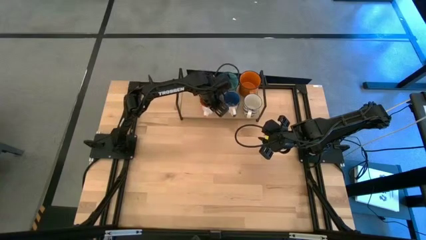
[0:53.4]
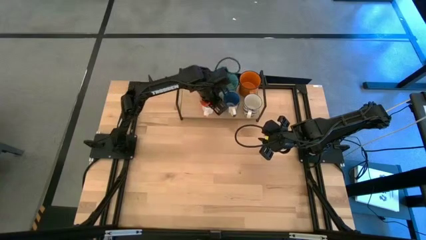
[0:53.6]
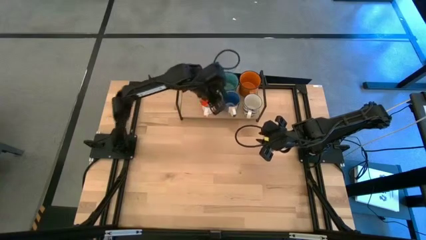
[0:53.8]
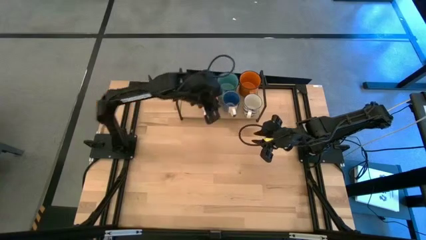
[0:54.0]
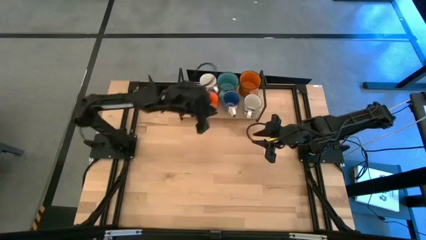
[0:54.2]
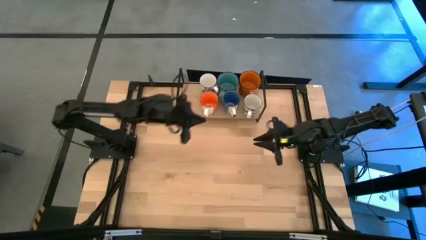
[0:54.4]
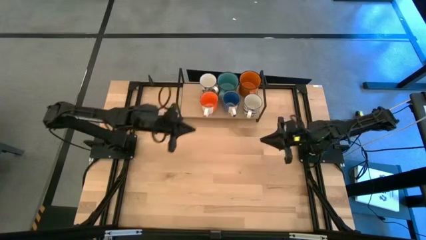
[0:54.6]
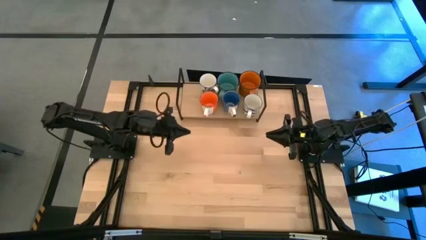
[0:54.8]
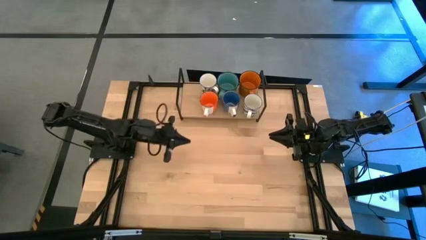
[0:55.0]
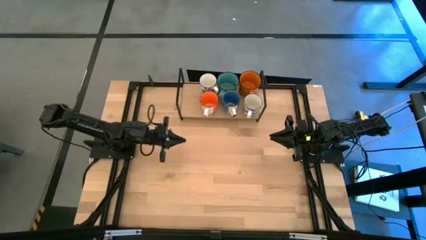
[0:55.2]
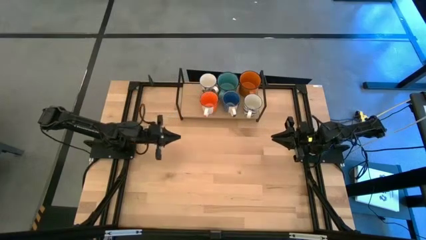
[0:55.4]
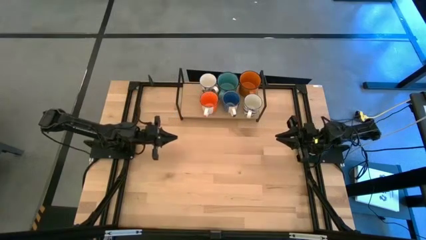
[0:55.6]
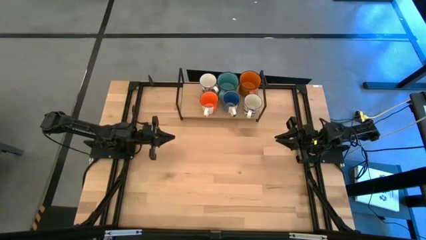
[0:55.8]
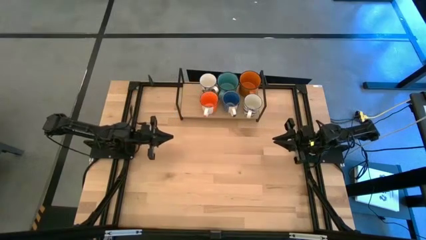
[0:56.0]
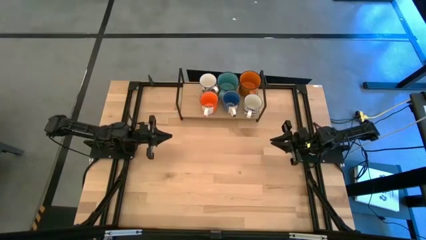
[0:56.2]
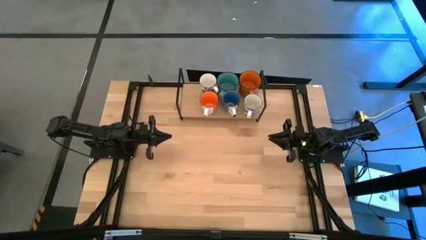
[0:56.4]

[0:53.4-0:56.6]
Task: Place coffee mugs
Return to Home Position

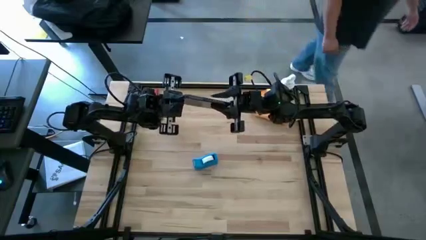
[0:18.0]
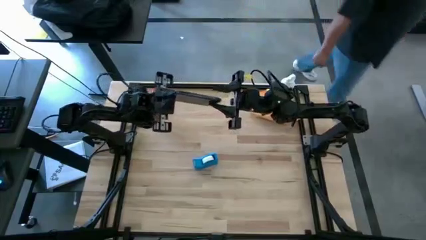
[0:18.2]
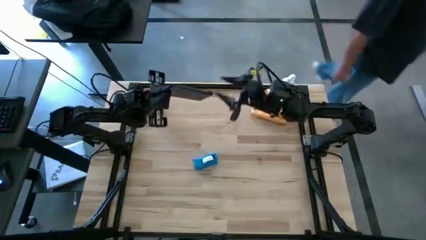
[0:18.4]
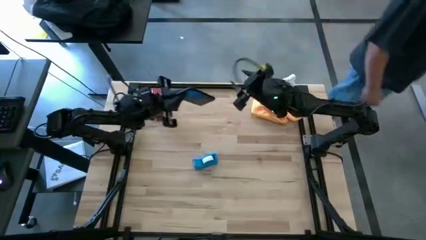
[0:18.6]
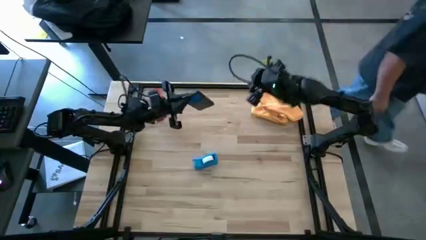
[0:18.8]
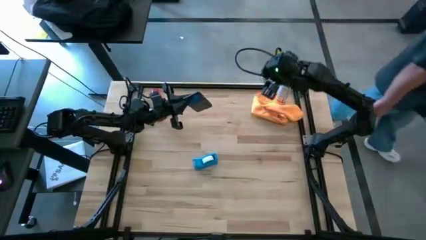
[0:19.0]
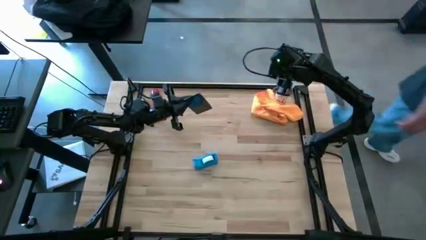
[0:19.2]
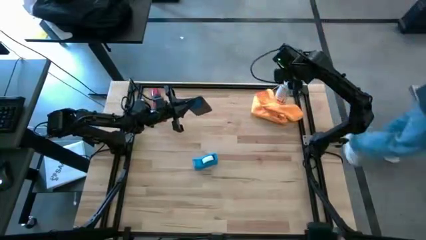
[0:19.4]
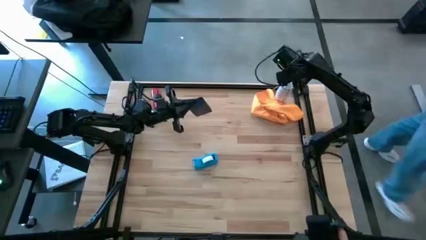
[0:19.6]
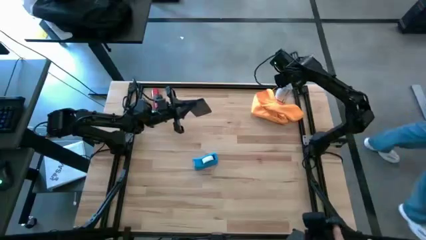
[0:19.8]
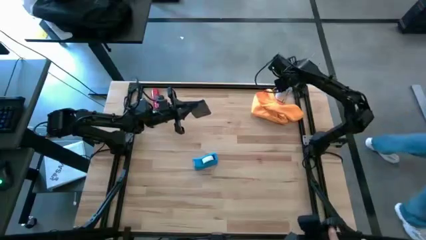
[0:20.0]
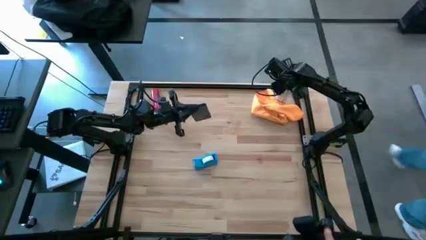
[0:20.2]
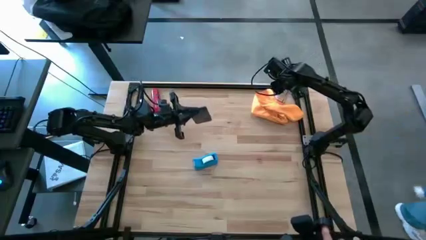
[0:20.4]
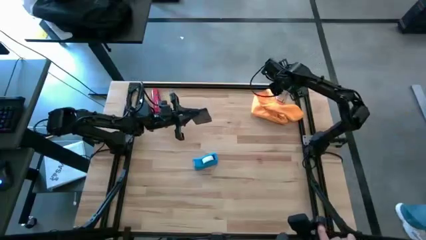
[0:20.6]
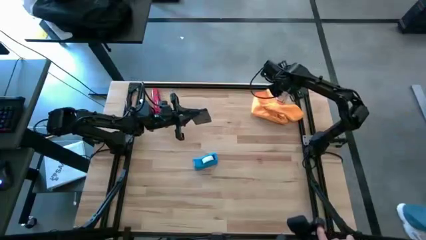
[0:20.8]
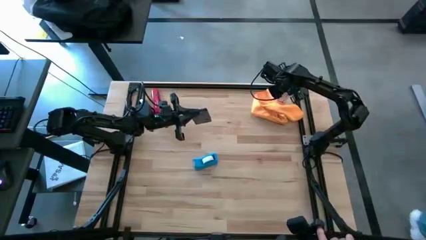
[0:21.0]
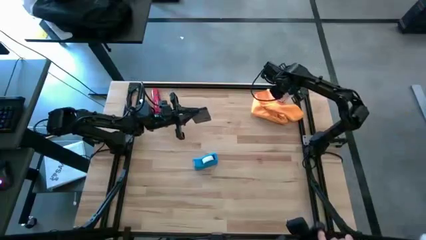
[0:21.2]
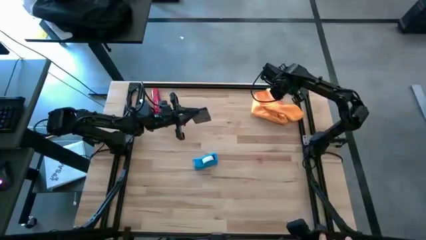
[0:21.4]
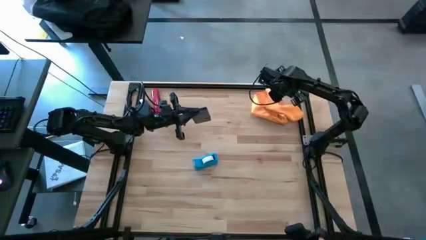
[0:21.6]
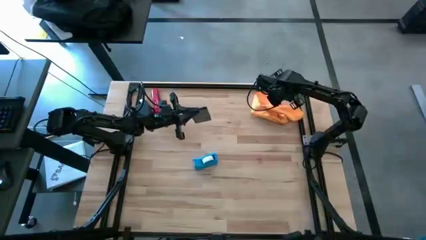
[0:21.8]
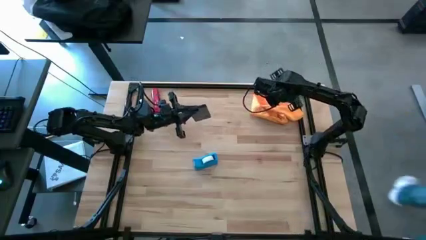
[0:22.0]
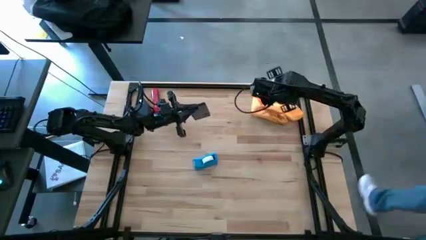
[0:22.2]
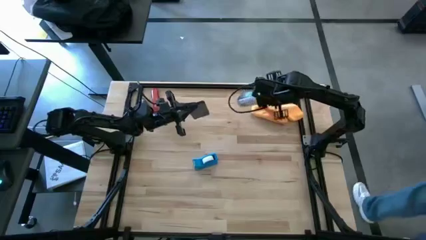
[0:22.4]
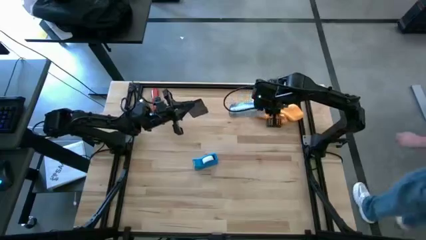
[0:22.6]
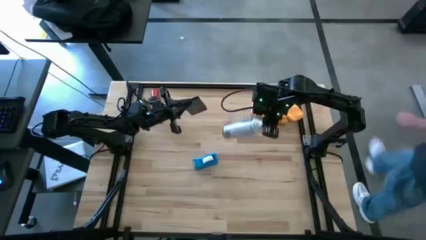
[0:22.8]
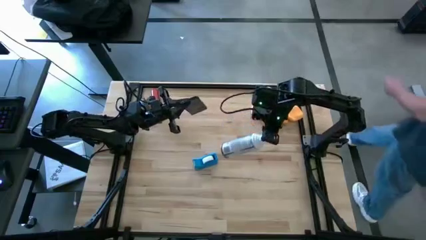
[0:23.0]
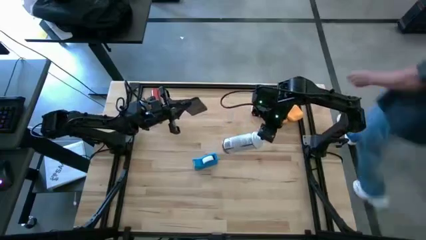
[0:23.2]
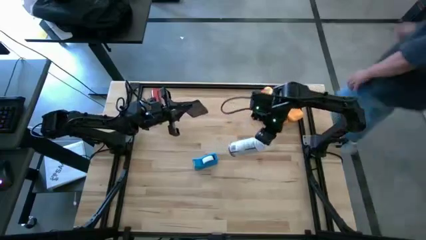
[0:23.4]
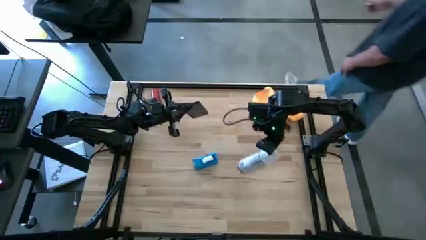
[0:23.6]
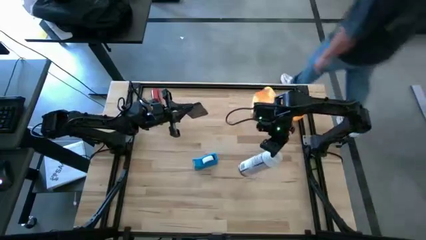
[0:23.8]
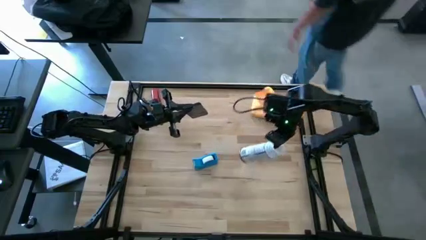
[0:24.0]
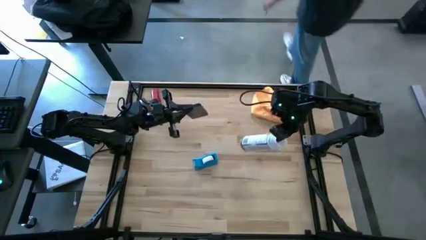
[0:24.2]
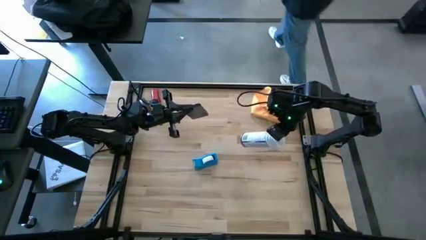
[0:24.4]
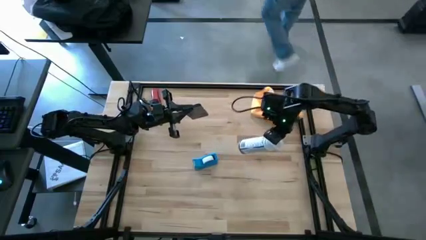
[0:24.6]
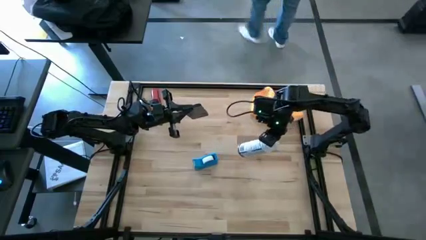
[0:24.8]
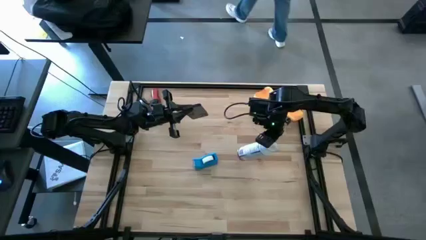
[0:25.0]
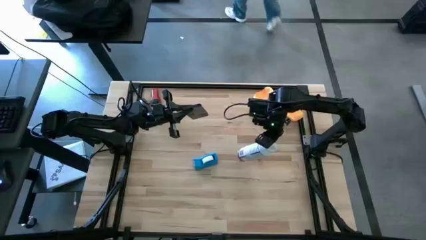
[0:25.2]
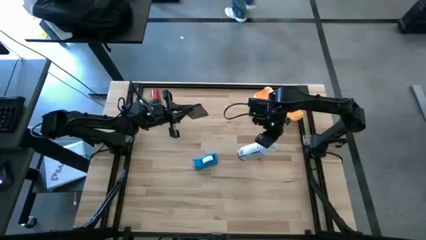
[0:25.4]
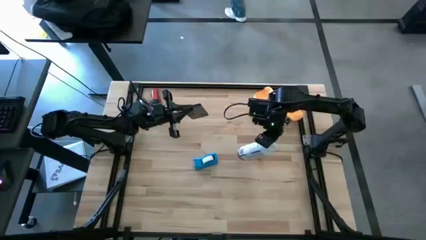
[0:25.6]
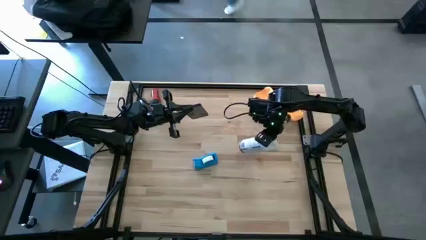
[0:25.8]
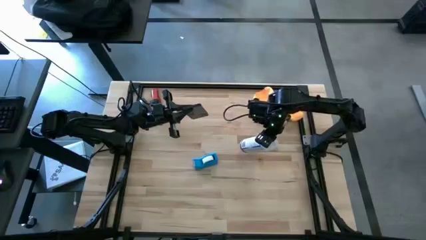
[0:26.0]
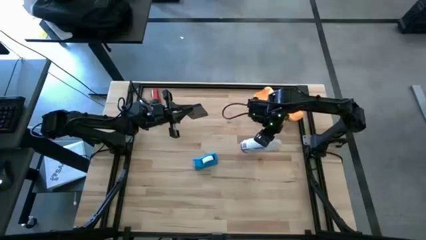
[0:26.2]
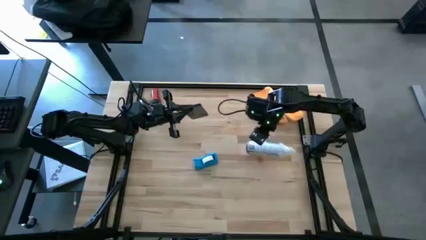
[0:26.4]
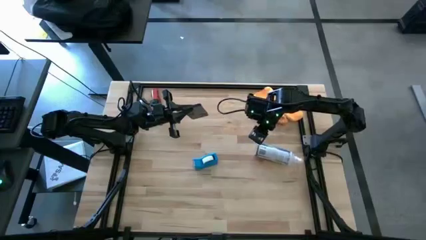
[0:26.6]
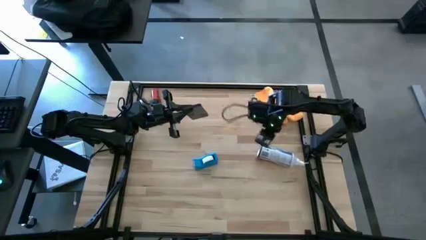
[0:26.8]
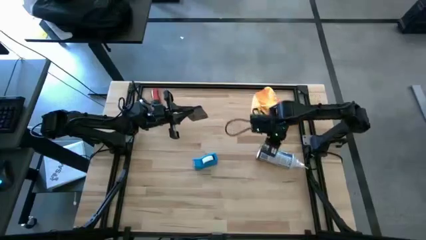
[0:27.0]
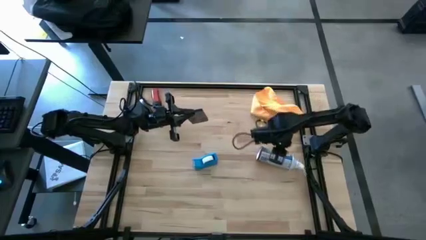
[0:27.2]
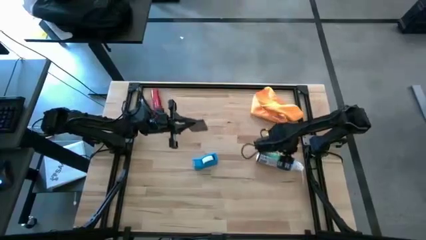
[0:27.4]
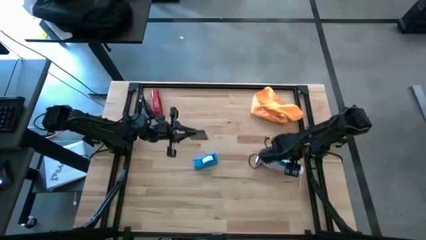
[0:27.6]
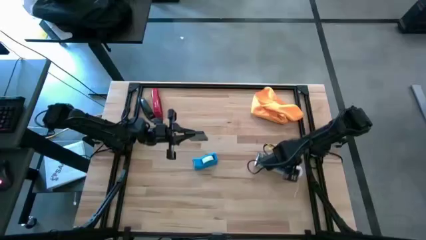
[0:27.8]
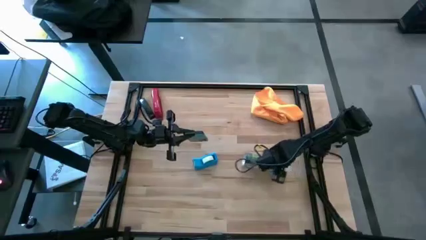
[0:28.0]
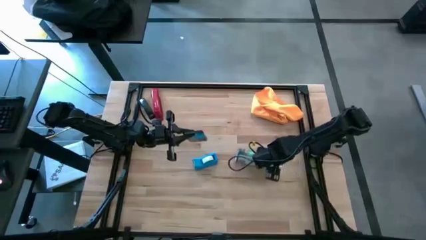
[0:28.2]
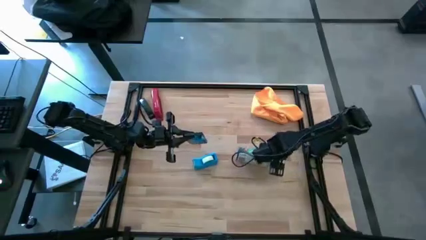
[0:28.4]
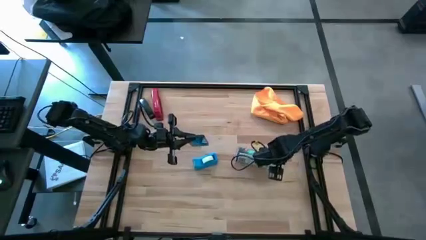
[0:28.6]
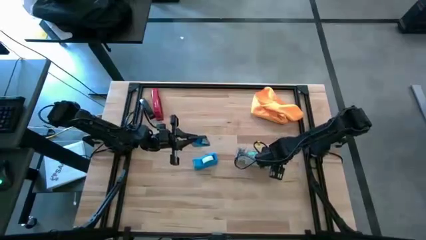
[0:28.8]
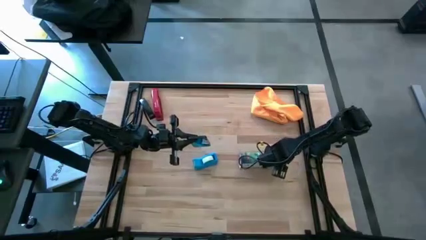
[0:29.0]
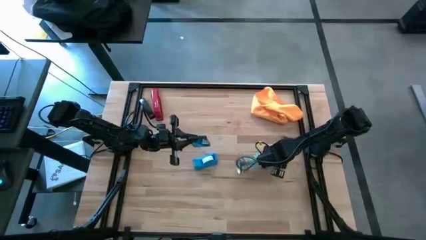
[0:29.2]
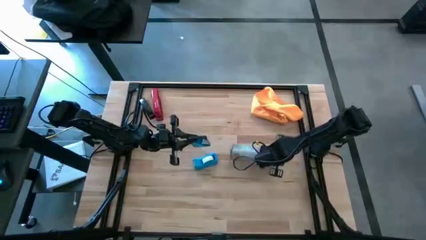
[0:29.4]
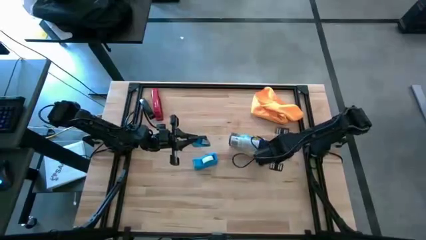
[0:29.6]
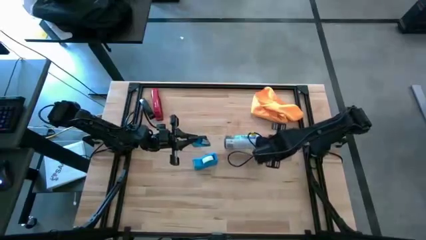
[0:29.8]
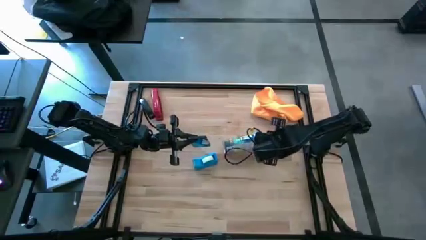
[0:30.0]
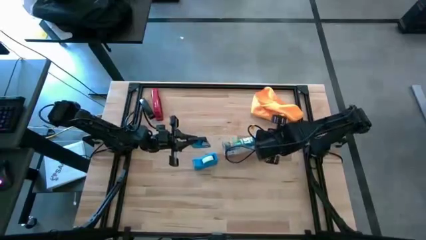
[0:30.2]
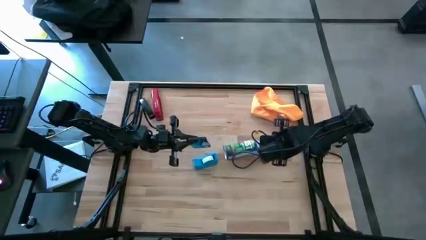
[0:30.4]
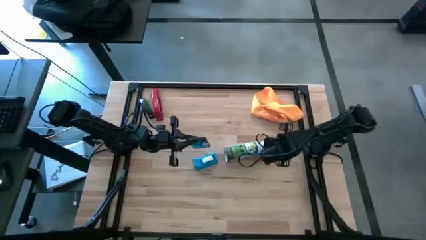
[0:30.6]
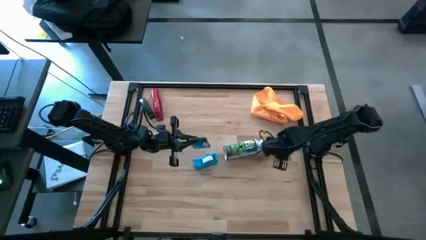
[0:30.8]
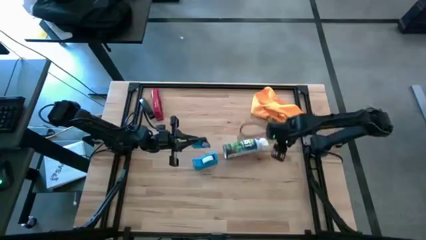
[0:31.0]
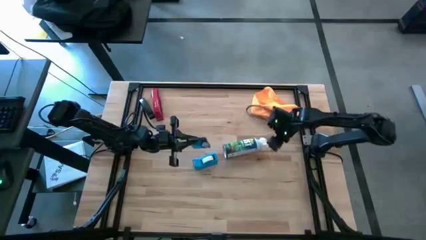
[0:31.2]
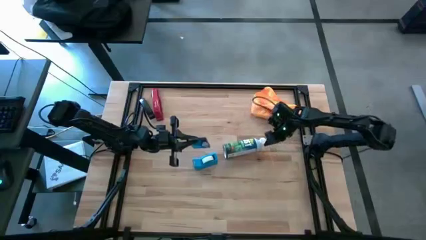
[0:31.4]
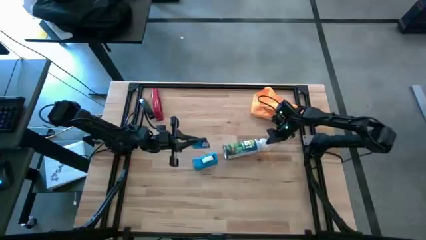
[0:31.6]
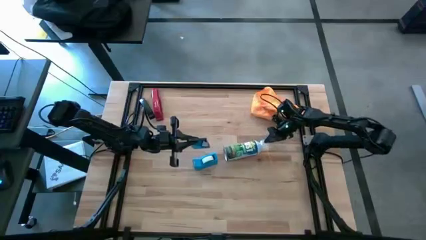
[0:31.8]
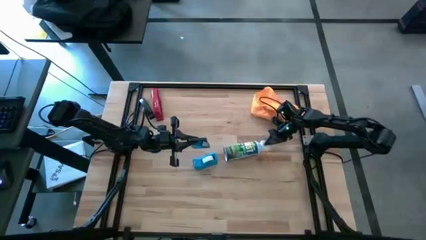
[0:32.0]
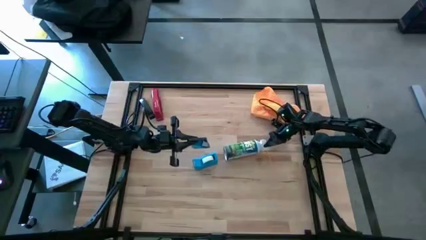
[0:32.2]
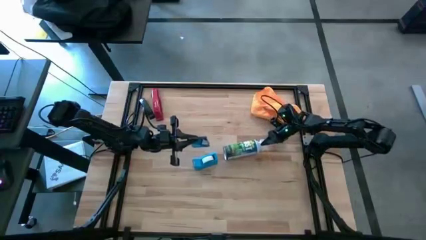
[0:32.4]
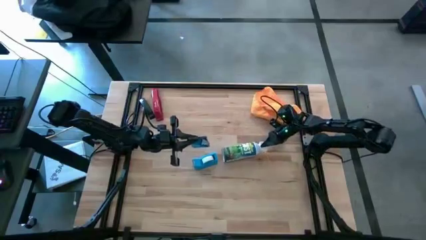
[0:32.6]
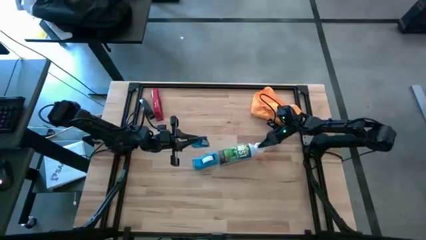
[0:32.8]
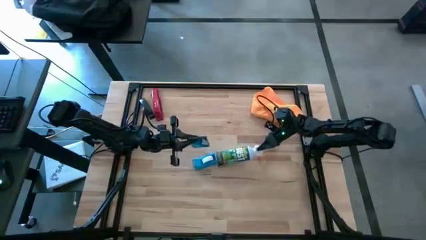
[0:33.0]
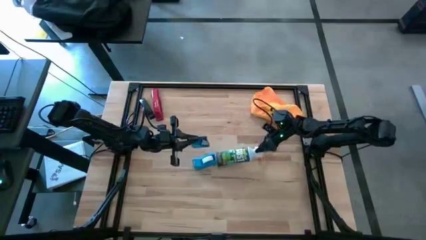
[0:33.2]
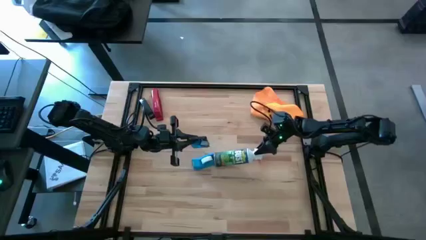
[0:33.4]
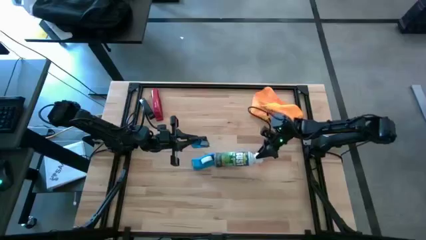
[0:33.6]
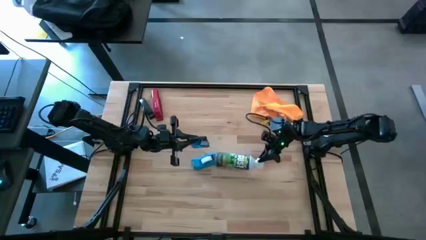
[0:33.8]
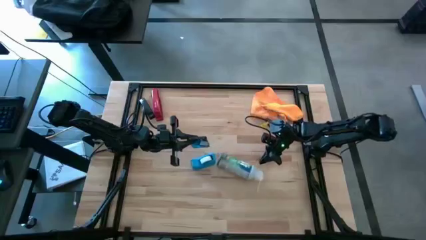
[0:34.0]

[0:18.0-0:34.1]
Task: Apply microfiber cloth
Spray the back of the black cellphone using the white spray bottle
